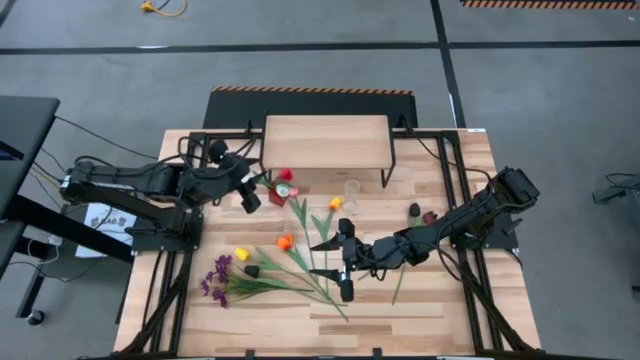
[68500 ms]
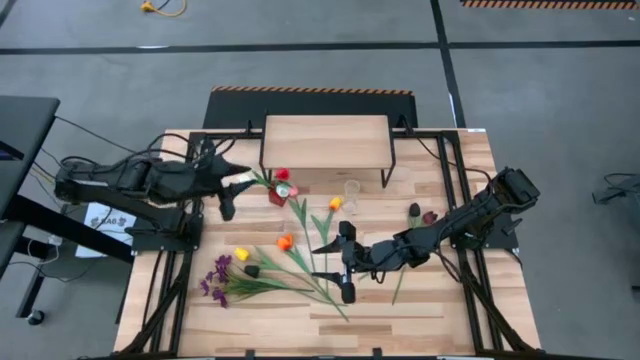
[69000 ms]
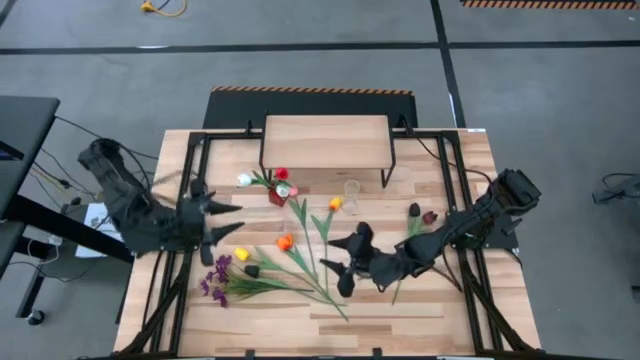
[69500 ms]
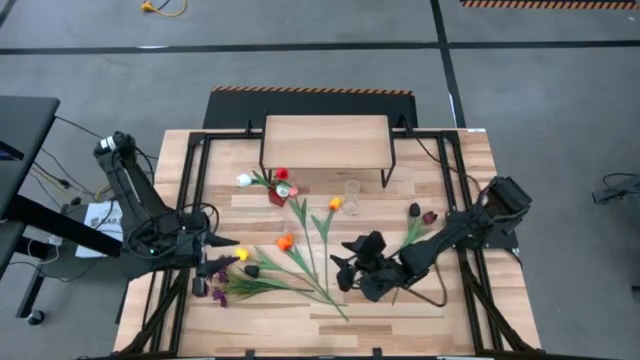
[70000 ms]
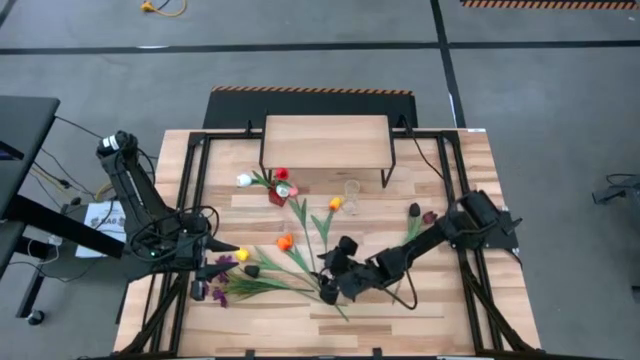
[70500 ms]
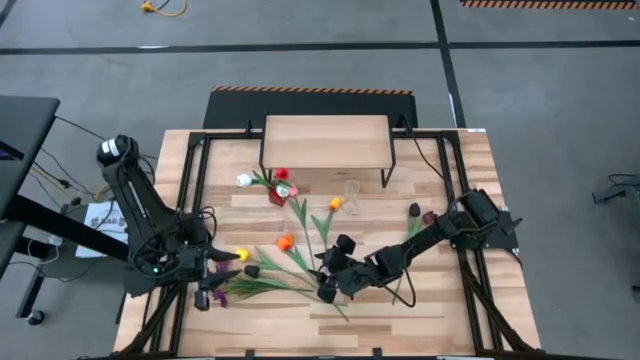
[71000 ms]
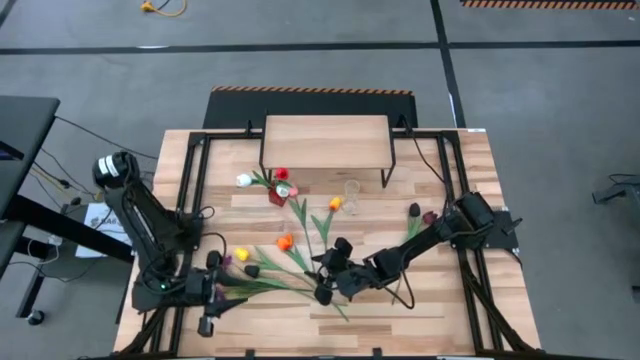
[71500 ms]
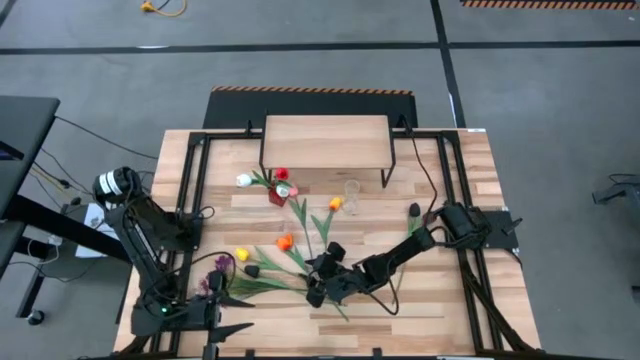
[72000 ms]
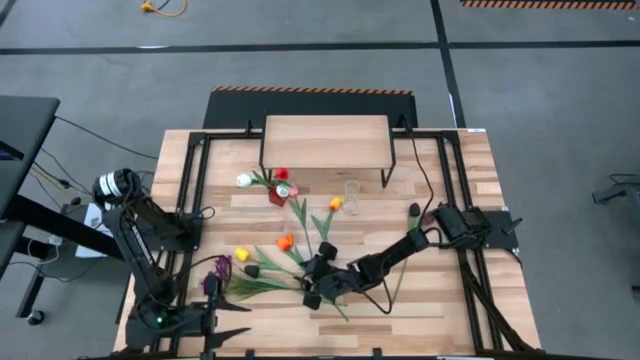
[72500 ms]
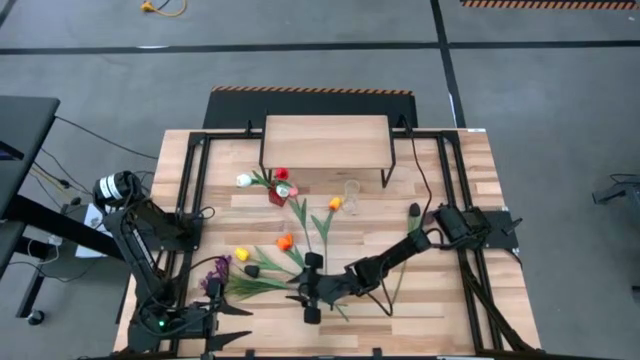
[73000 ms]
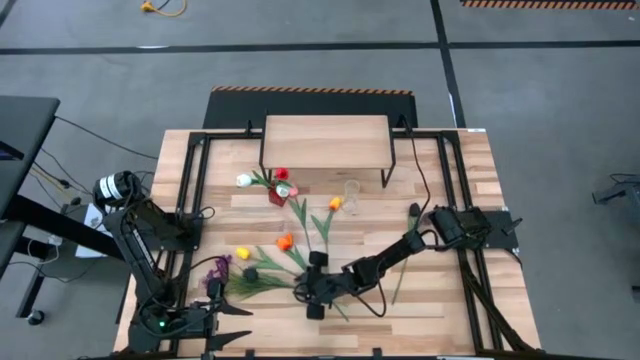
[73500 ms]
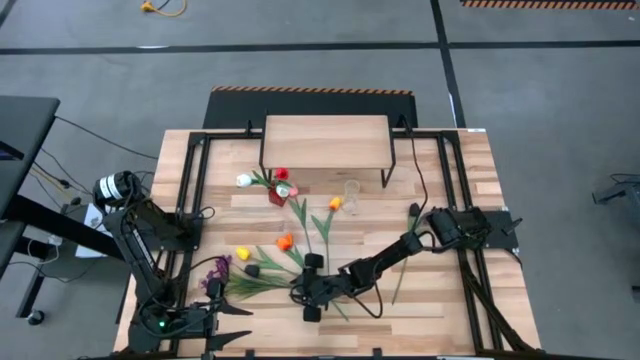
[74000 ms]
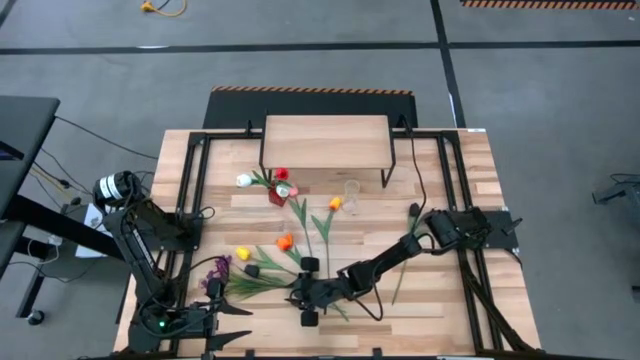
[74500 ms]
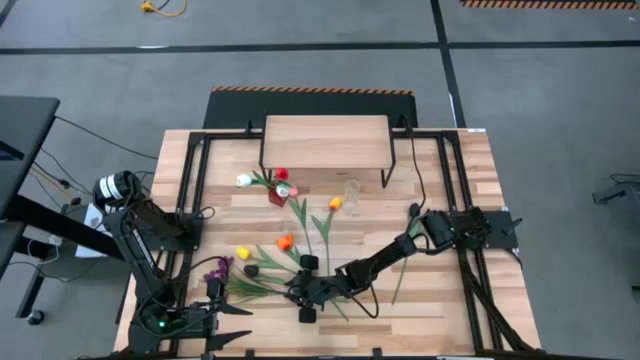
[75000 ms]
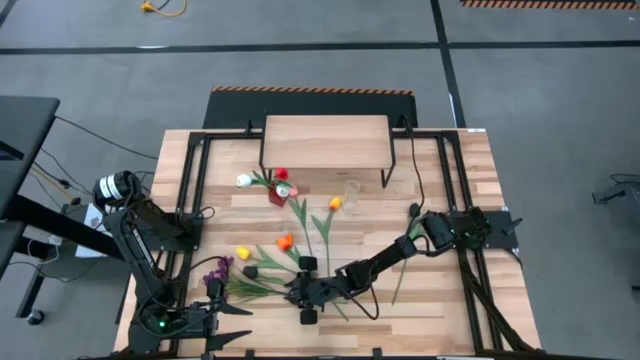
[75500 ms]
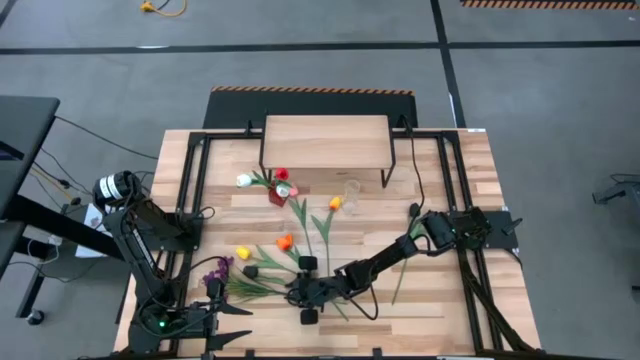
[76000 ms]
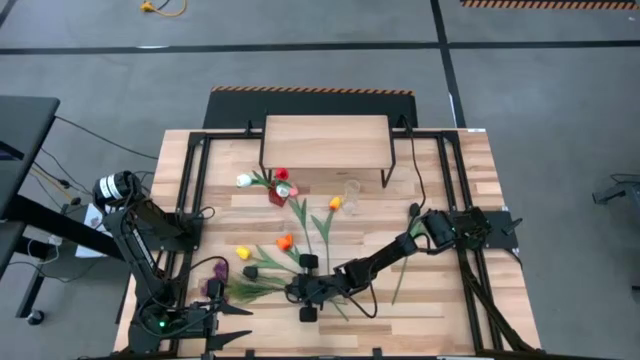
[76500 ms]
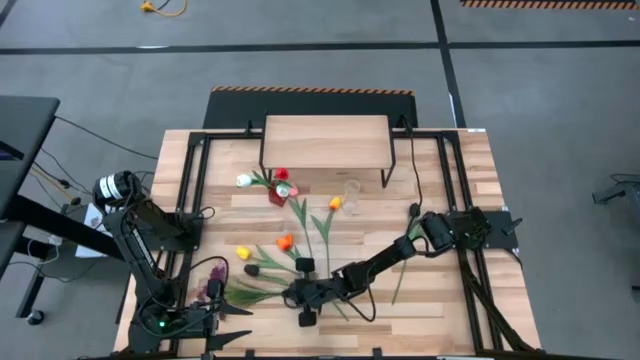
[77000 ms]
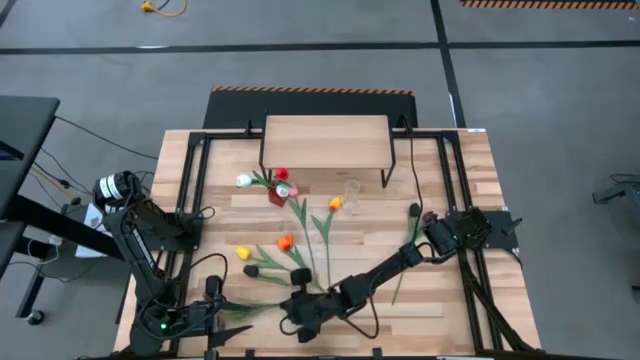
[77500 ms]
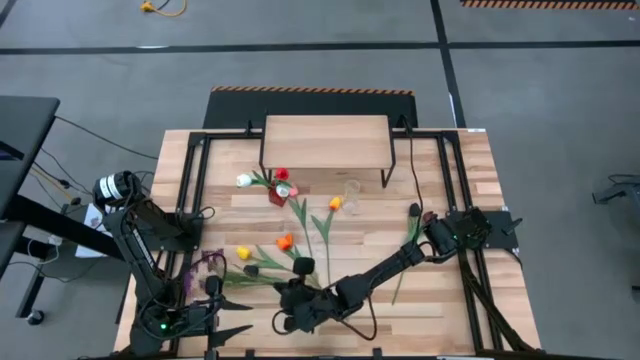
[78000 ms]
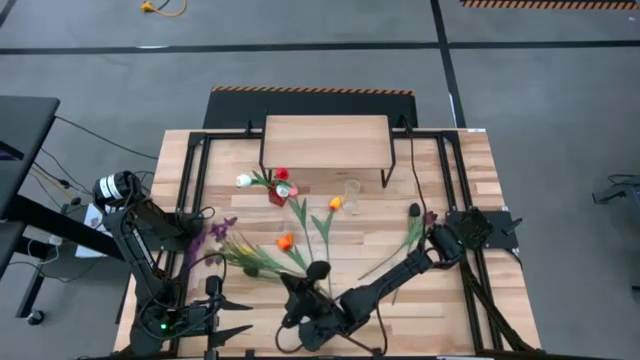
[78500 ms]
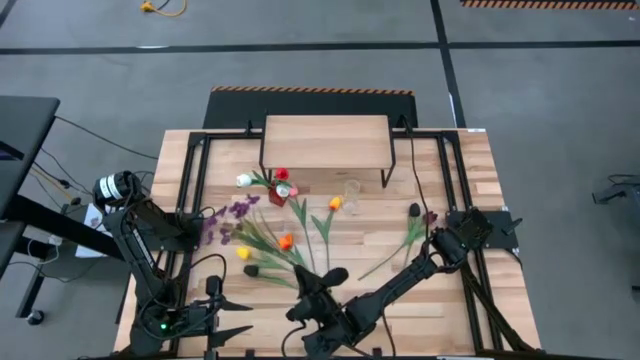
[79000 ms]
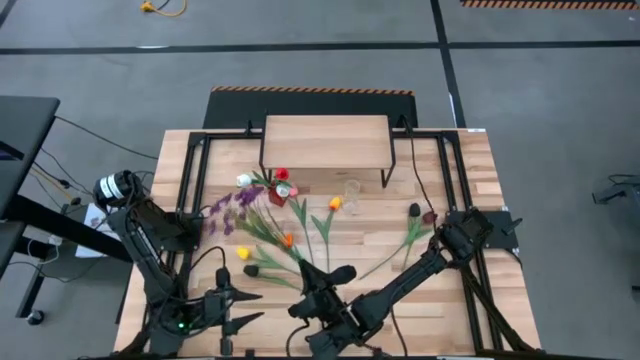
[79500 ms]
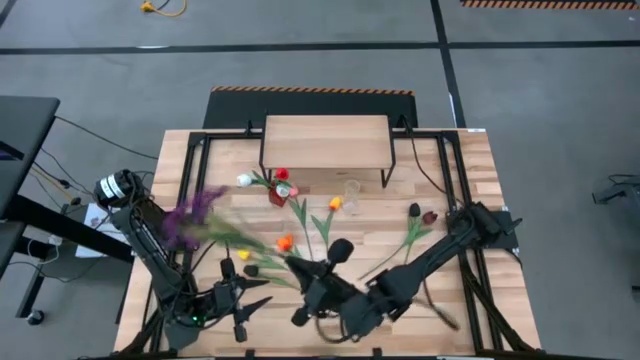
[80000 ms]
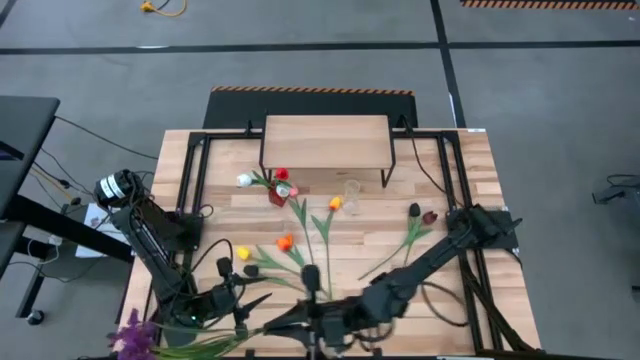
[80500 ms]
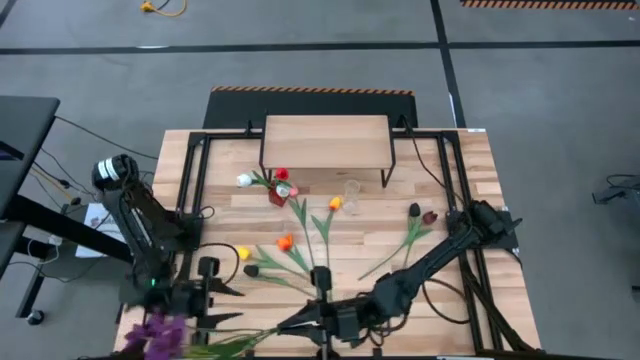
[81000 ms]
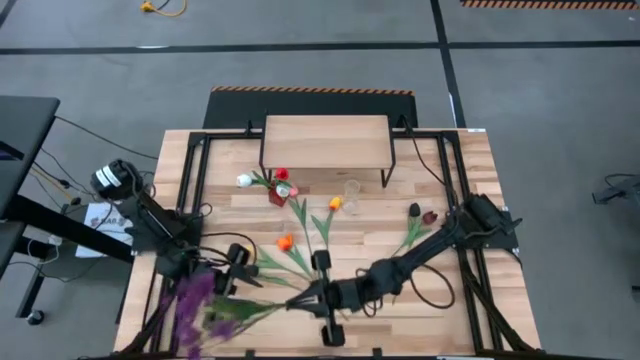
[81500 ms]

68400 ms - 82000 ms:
Task: Pick and place flowers into a vace then onto a shelf
Put the purple flowers into the red flower vase

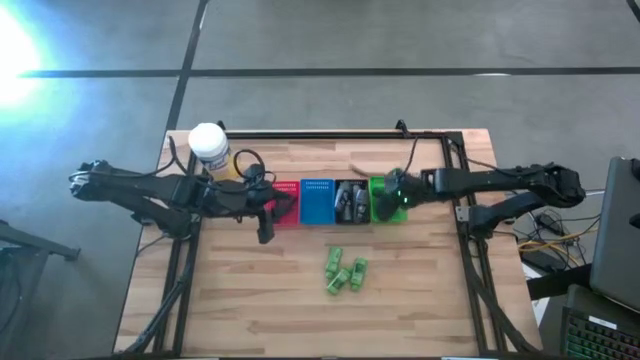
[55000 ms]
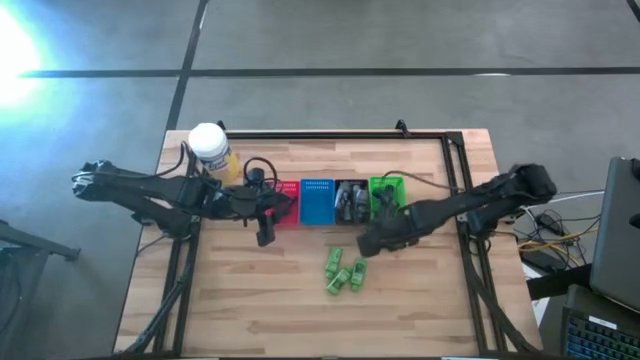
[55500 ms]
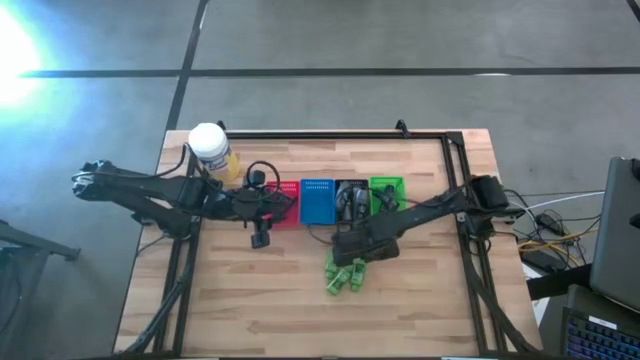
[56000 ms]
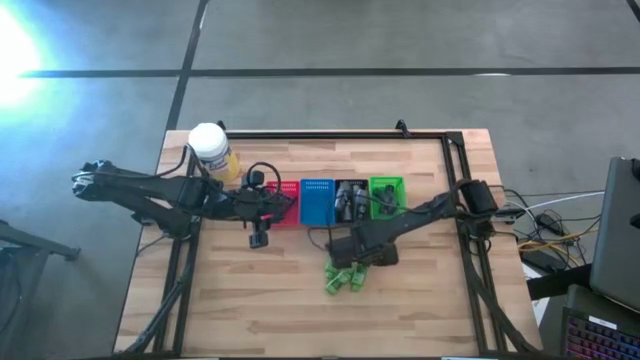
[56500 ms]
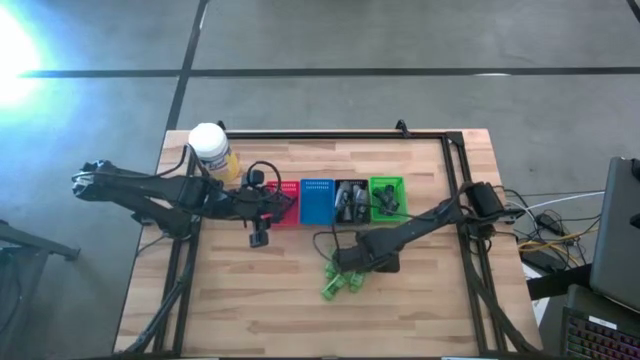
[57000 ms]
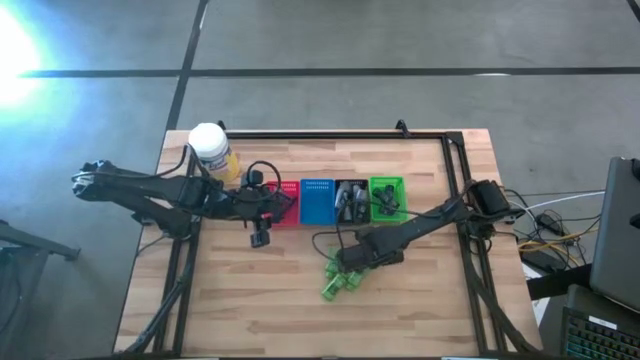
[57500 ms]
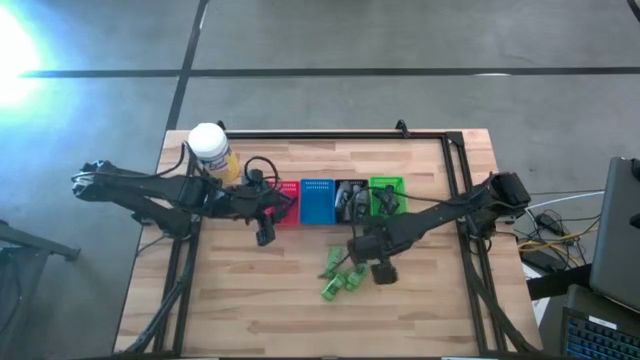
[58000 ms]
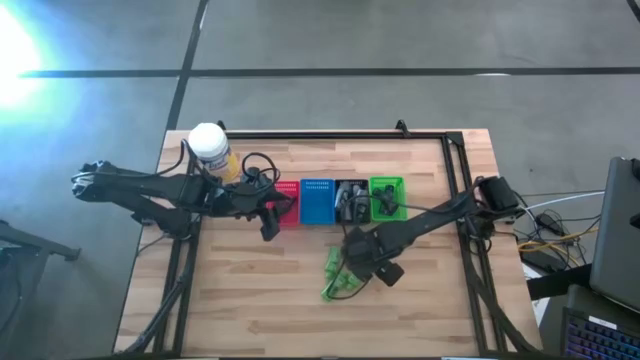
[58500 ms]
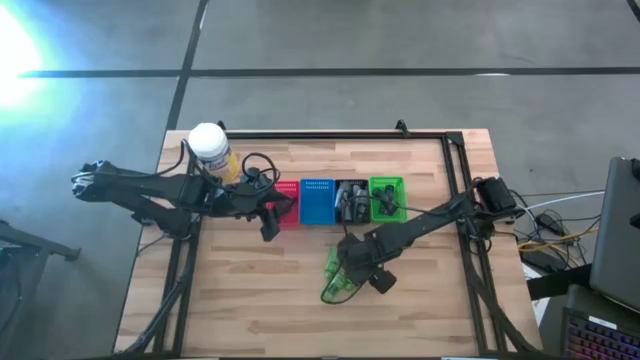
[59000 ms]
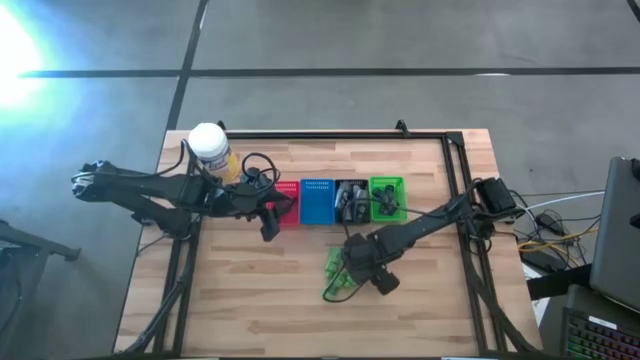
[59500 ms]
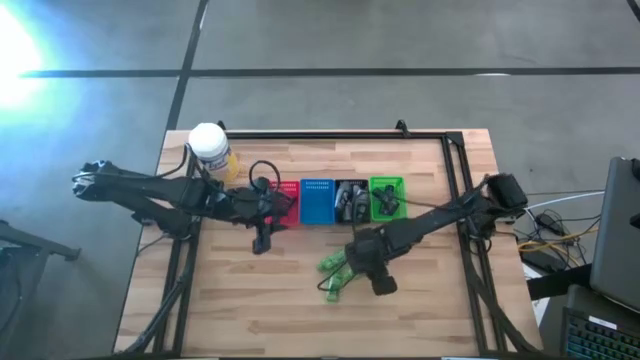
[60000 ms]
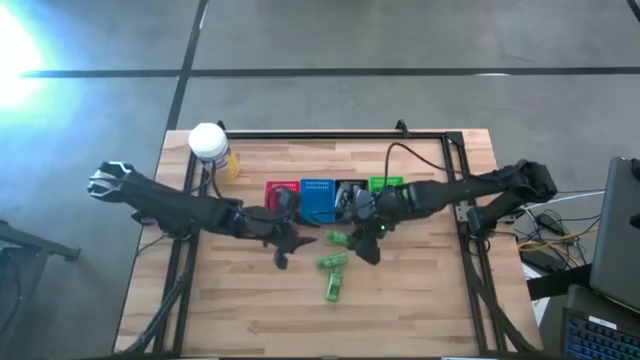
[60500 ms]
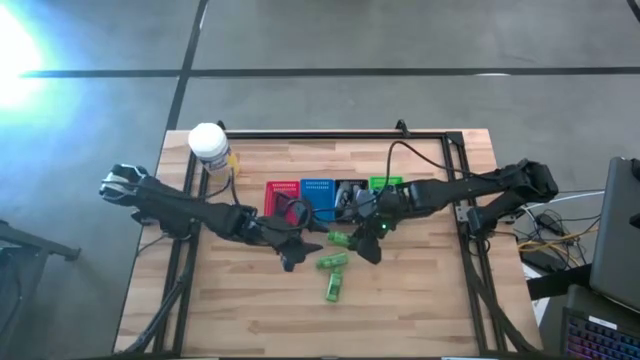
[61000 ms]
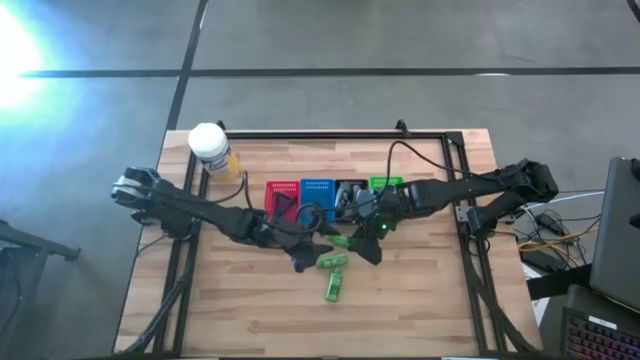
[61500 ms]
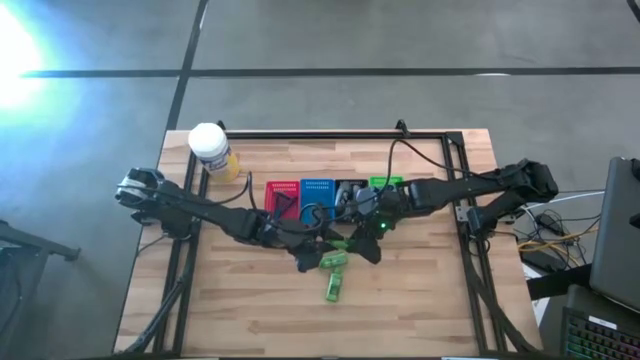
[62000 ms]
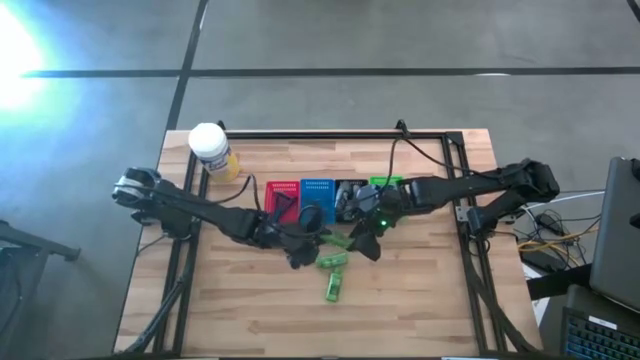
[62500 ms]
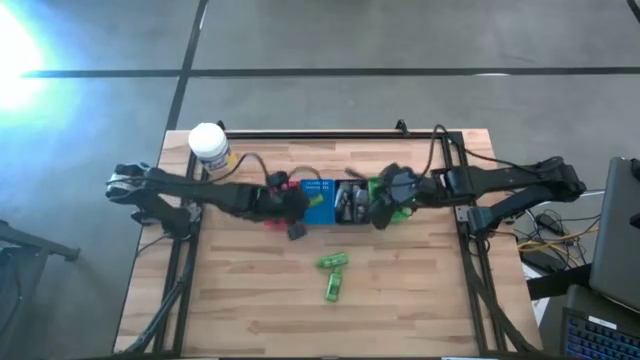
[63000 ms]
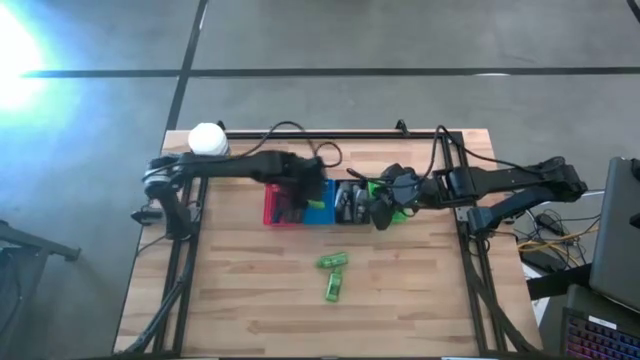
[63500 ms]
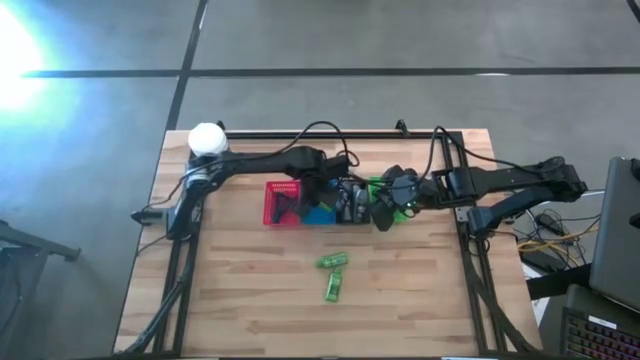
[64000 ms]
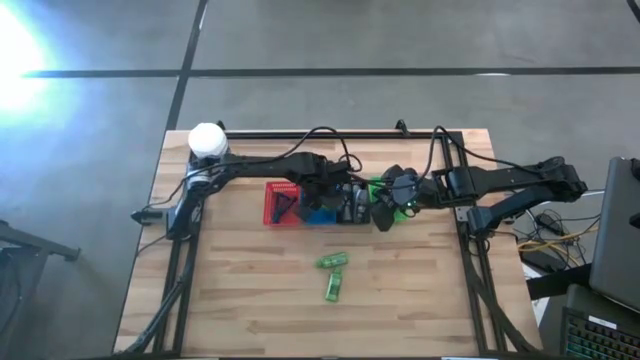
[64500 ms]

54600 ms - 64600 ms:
Task: Pick & Place Travel size toiletries
Put the green shampoo into the blue bin
